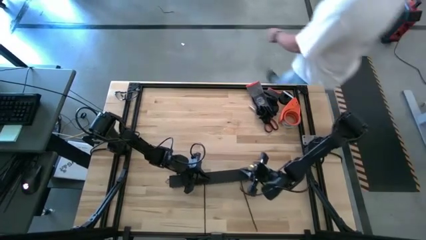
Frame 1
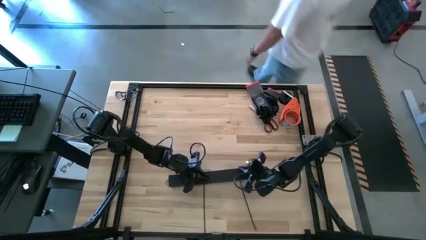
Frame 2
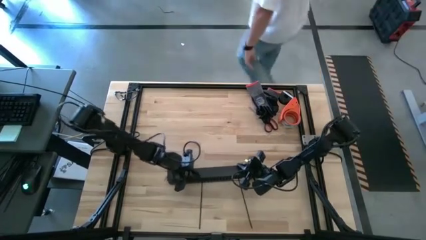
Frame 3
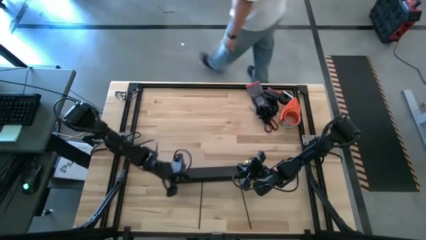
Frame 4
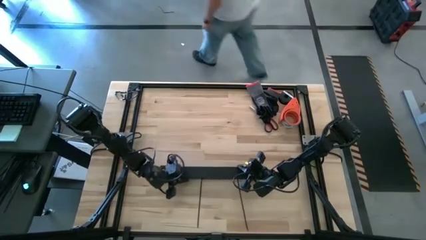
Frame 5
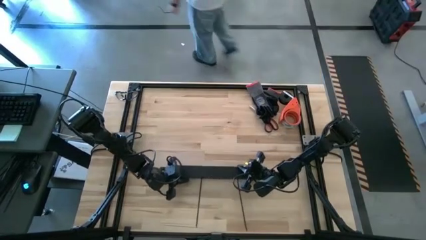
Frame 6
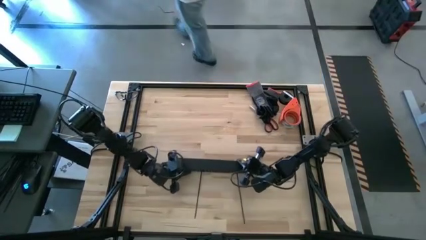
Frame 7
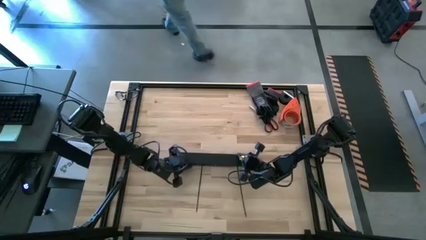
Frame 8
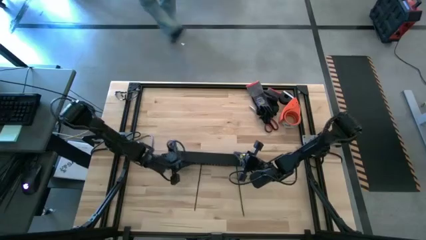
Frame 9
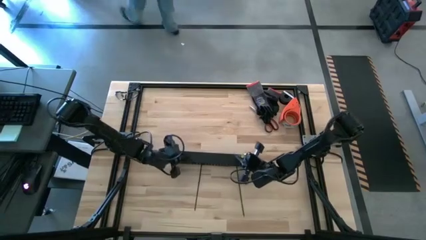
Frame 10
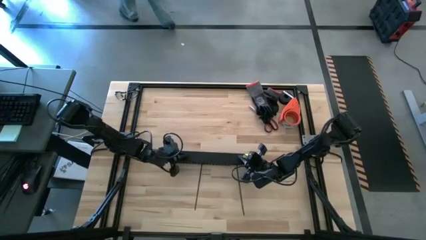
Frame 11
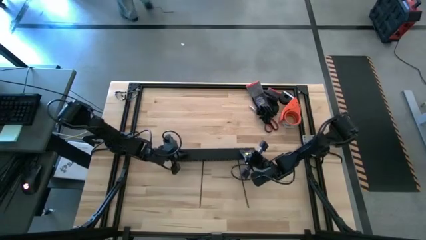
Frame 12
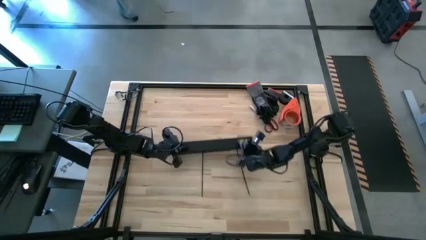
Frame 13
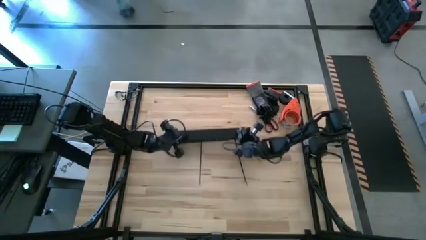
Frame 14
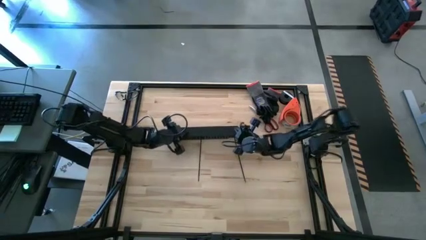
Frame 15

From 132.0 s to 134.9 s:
Task: Ziptie cables
Move the black cable duct to the center of the table

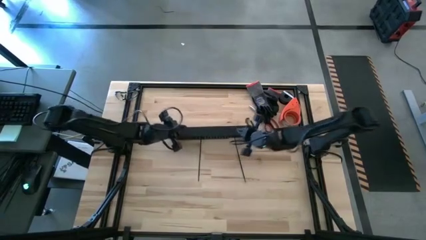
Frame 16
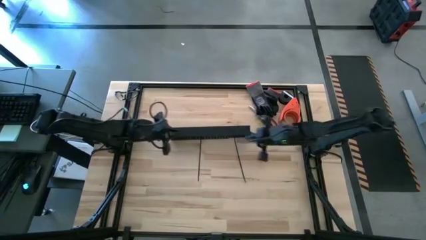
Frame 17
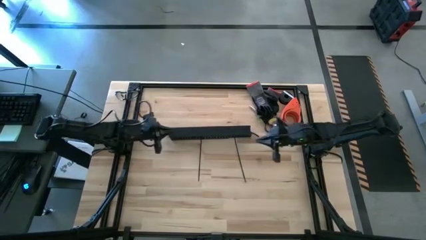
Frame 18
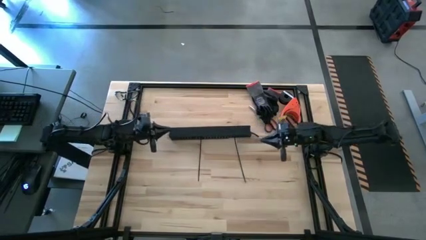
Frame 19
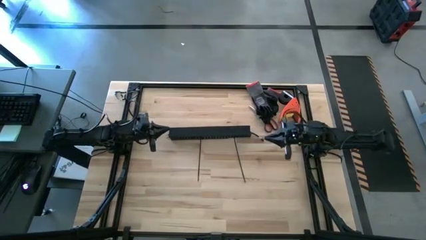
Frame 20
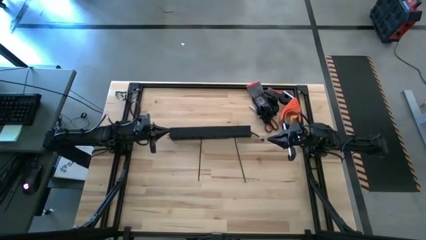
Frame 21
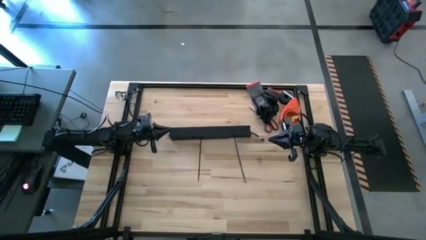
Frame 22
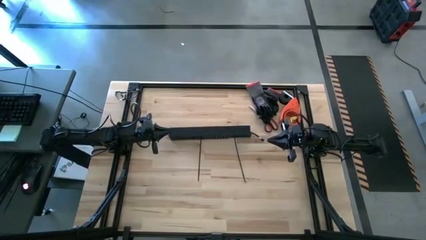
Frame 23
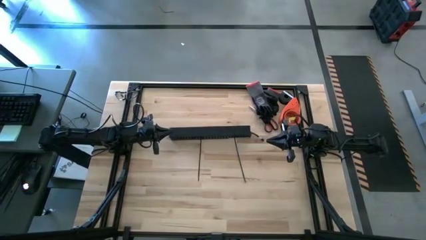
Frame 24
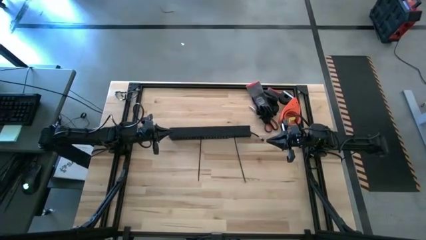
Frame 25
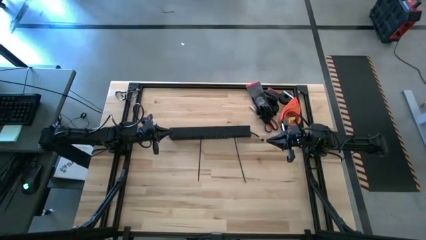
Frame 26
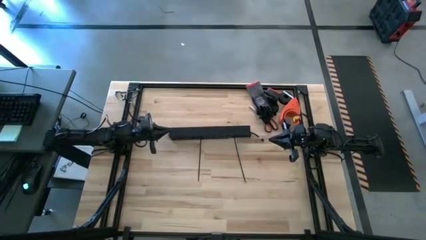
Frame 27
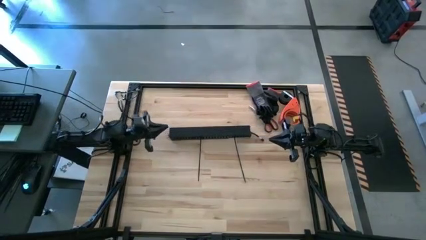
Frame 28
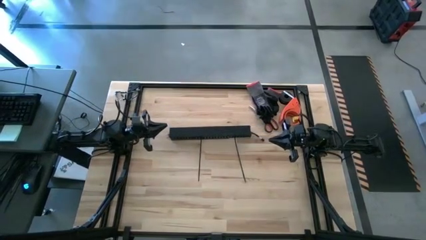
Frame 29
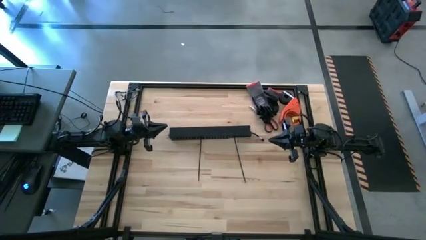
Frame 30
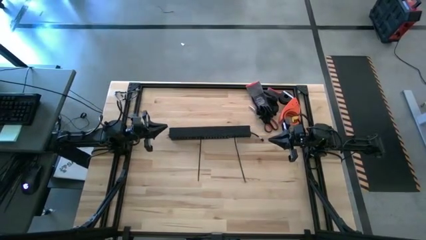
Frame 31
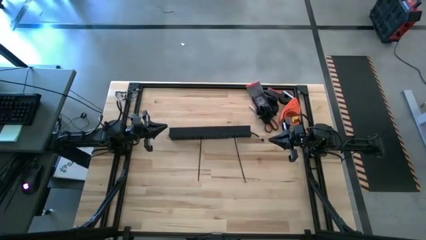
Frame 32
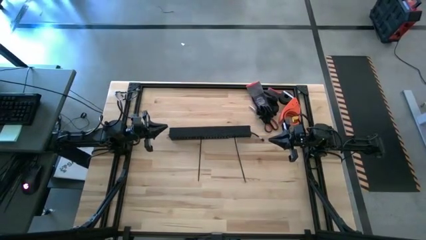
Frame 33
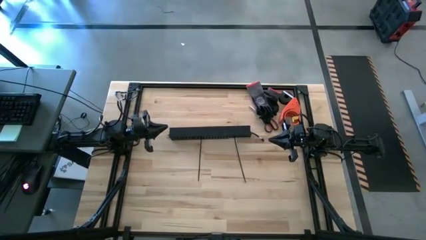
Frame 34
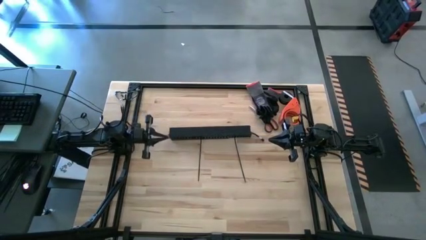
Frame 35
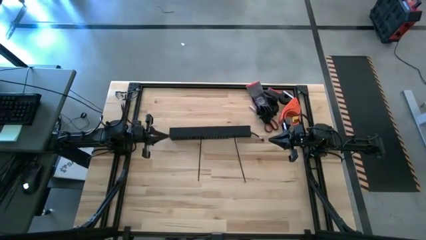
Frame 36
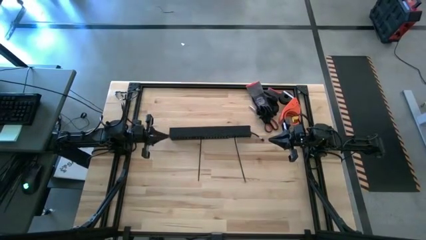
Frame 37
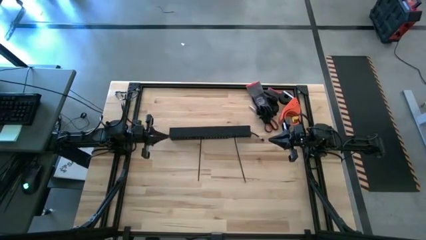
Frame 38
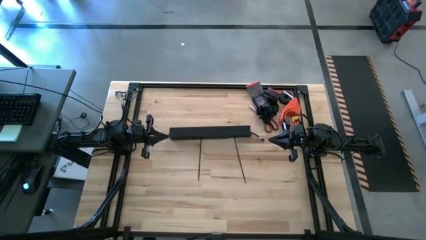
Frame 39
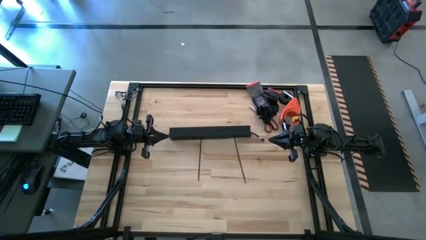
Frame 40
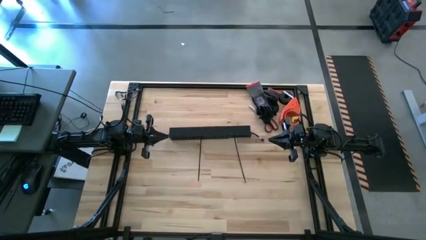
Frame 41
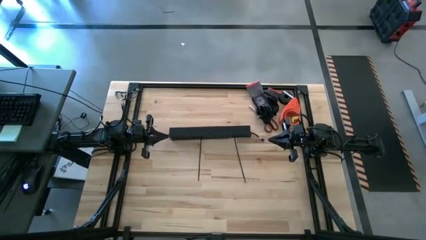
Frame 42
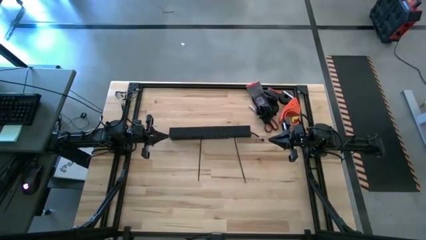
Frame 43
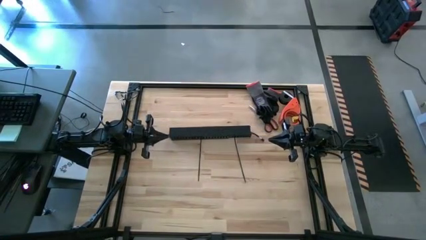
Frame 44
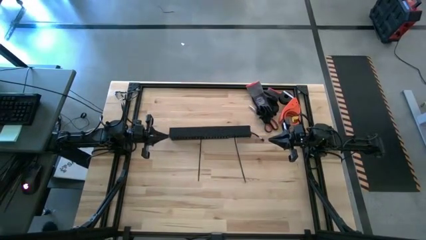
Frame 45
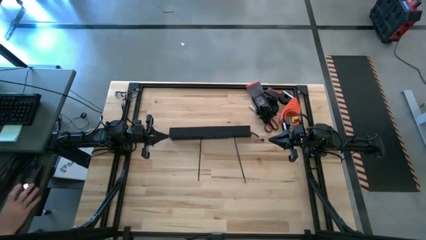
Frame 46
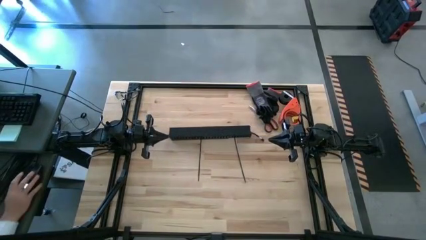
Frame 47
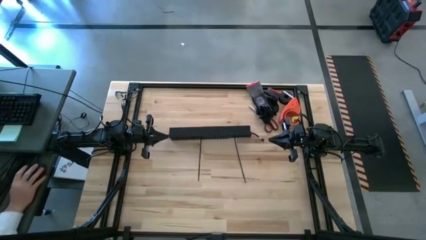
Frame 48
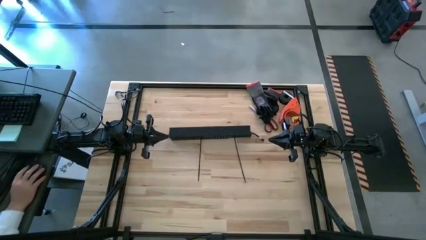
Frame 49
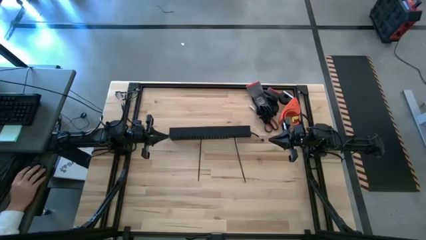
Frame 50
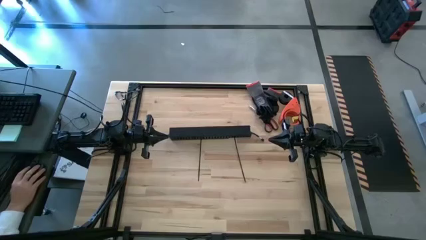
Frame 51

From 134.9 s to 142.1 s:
Return to Home Position
